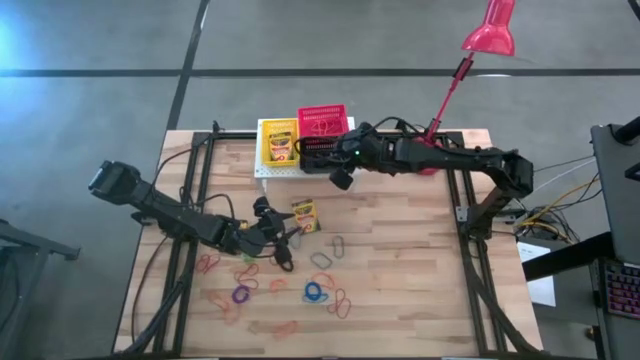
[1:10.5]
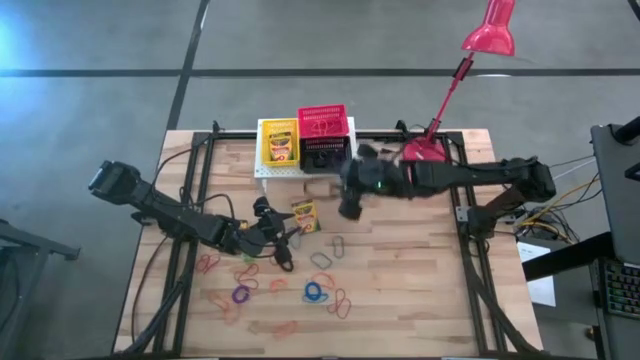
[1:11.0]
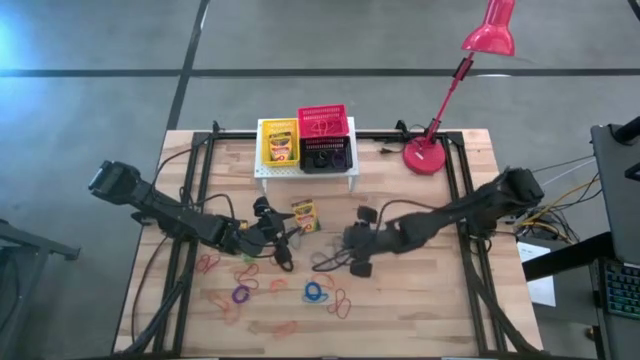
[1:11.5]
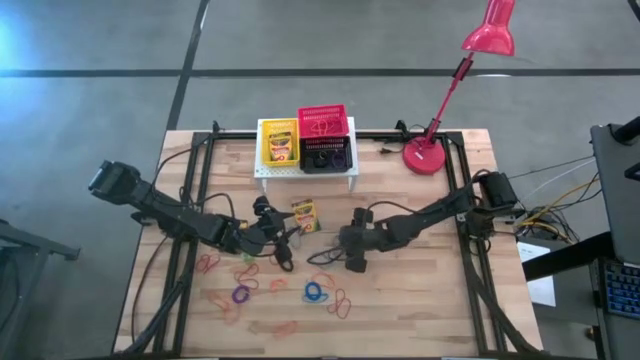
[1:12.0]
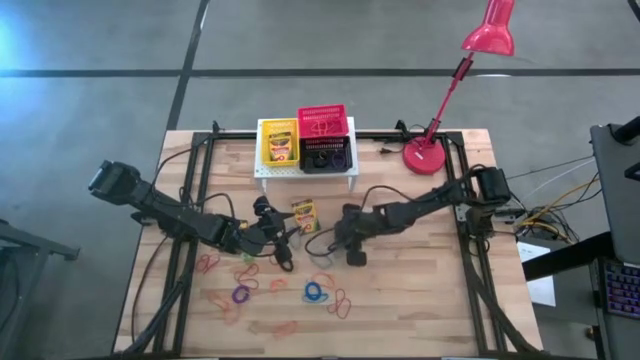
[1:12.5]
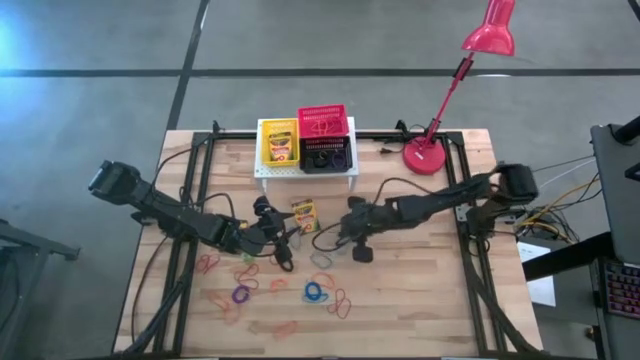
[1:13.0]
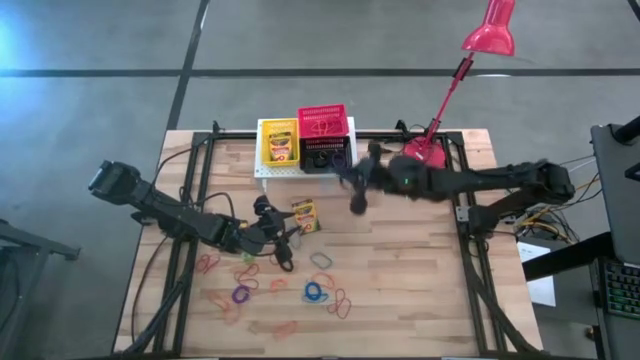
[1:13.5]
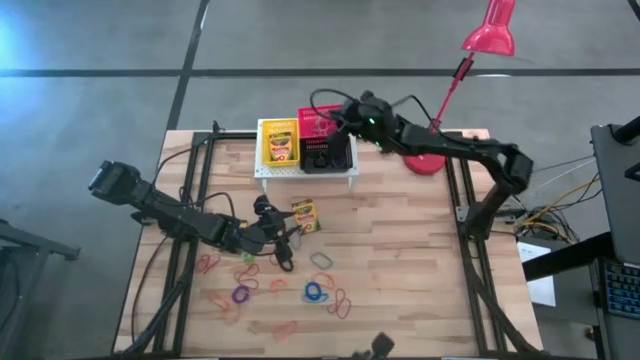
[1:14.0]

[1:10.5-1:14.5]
Task: Pick & Place Office Desk Supplies
Put the blue rubber band into the red bin

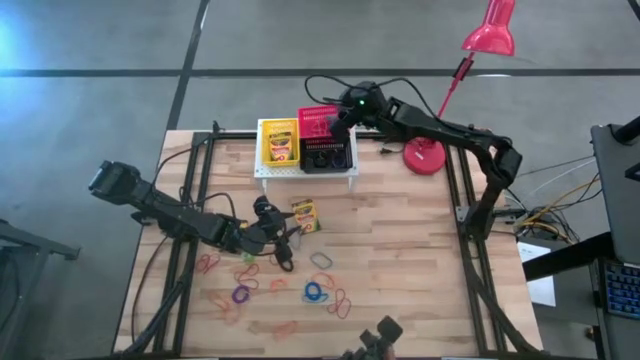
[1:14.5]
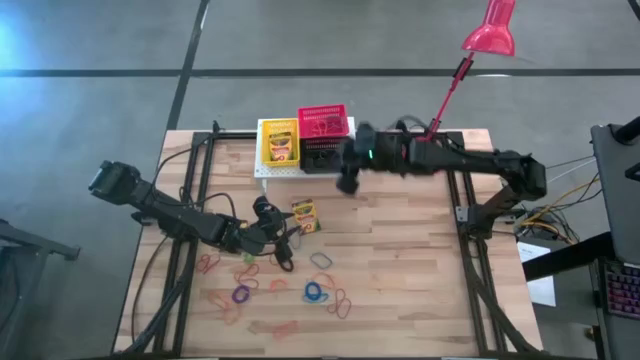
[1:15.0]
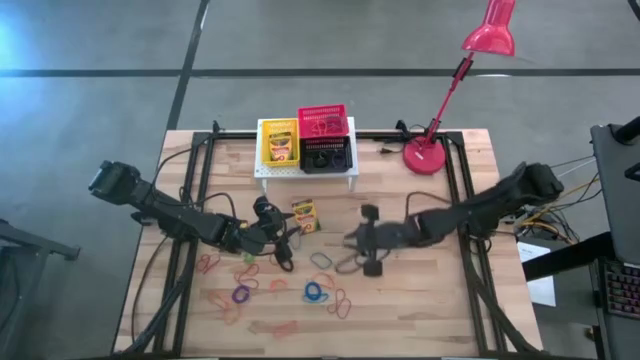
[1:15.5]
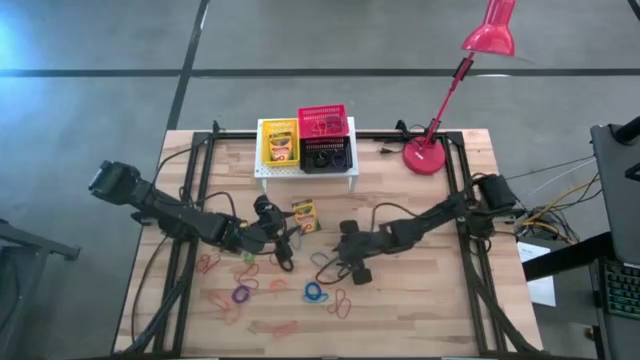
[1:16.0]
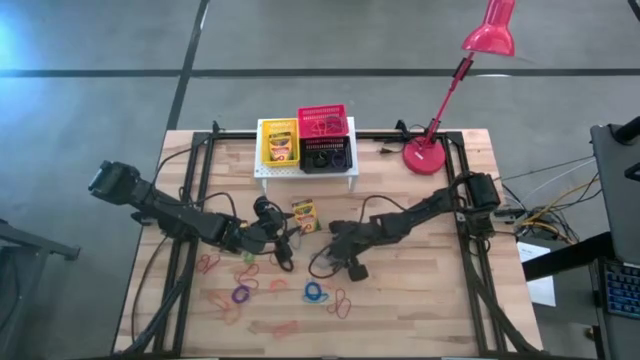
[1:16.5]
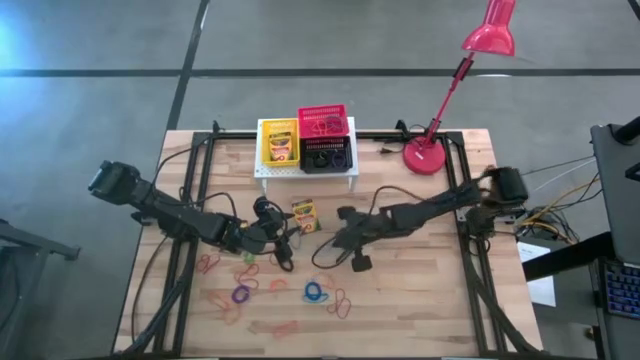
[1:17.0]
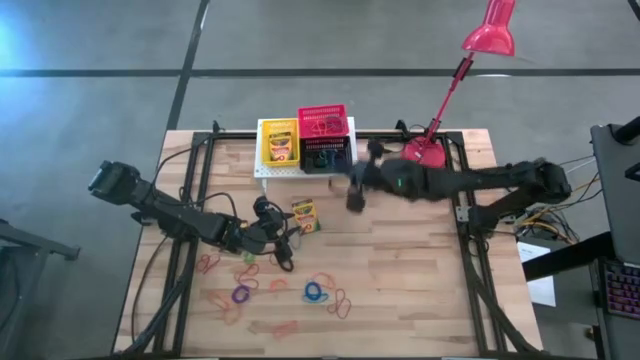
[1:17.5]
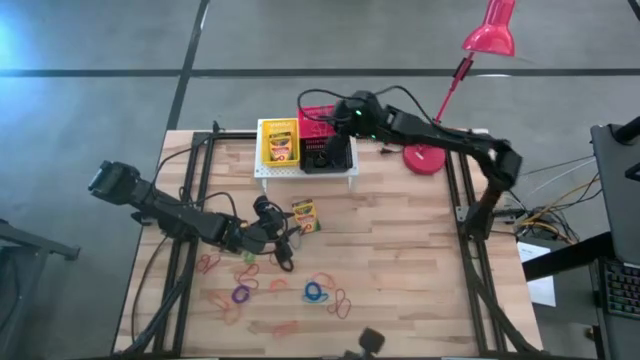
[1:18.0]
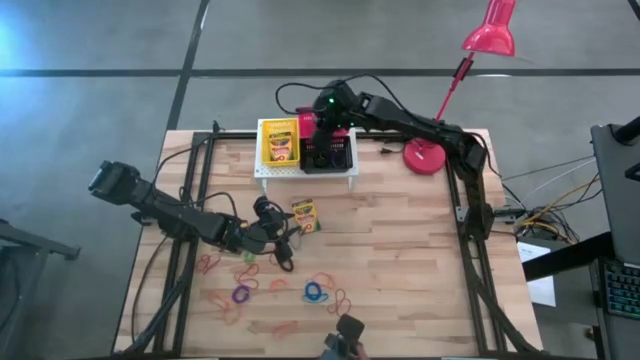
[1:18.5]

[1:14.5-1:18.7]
Put the blue rubber band into the red bin

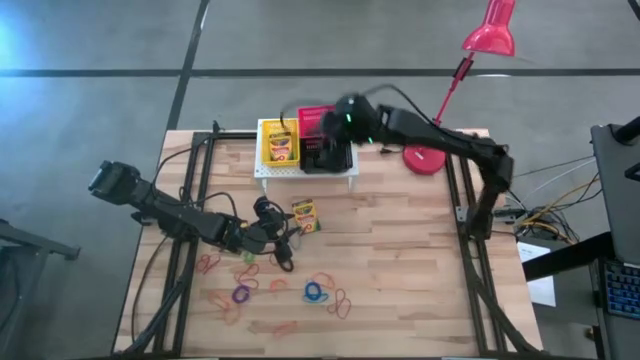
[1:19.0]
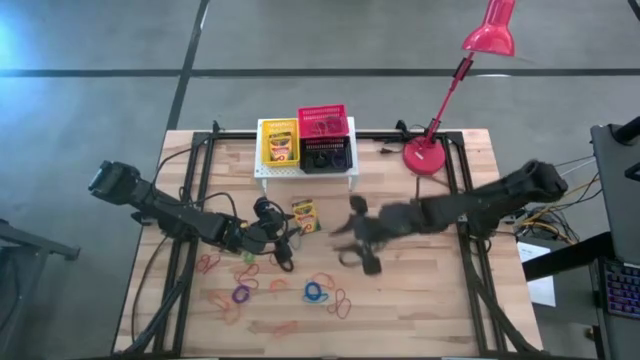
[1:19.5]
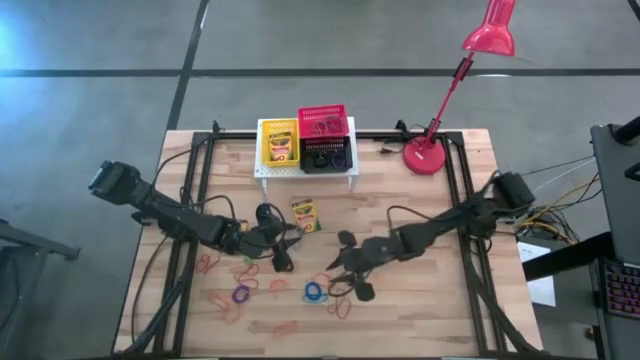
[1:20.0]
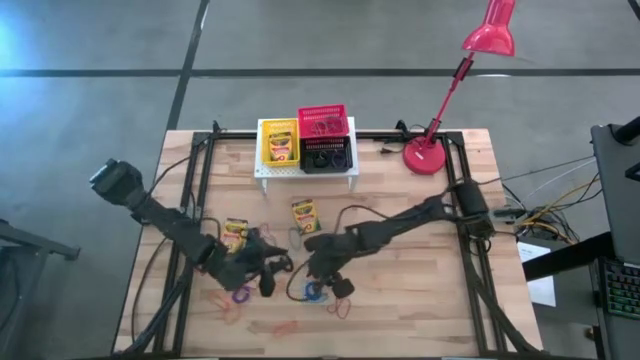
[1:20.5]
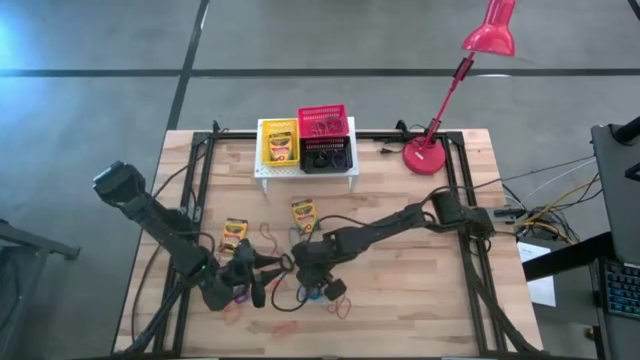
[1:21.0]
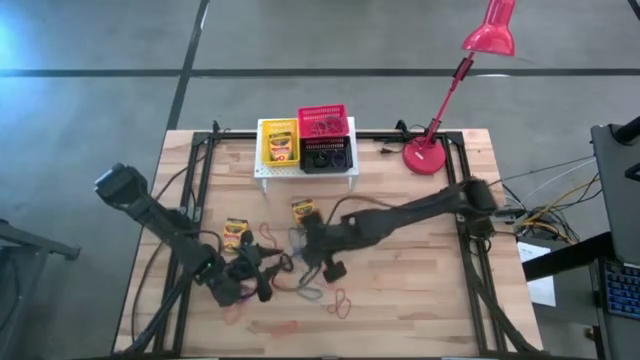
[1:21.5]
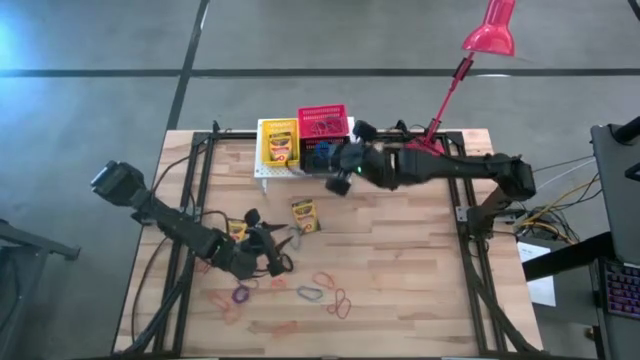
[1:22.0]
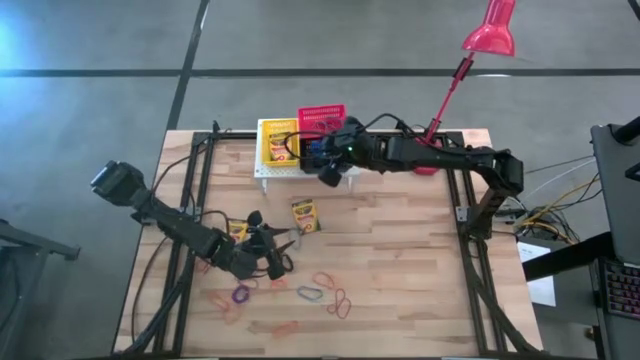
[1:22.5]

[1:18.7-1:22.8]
Put the blue spring keychain into the black bin

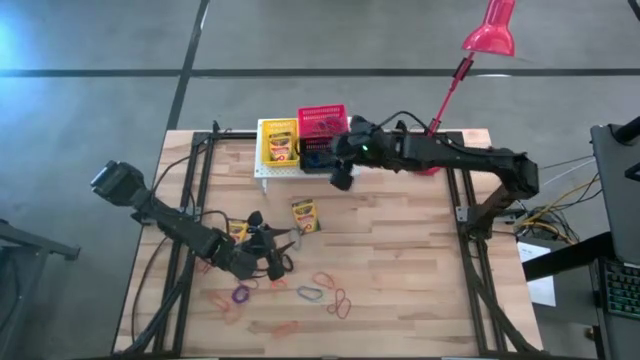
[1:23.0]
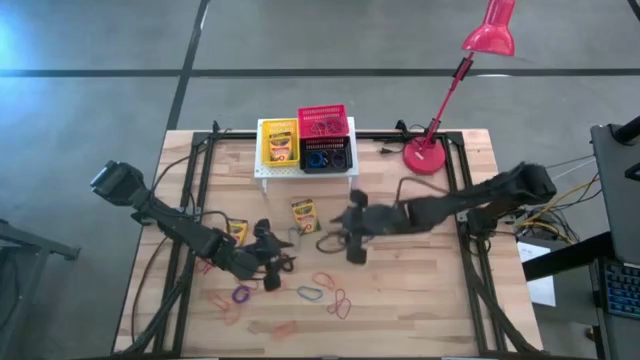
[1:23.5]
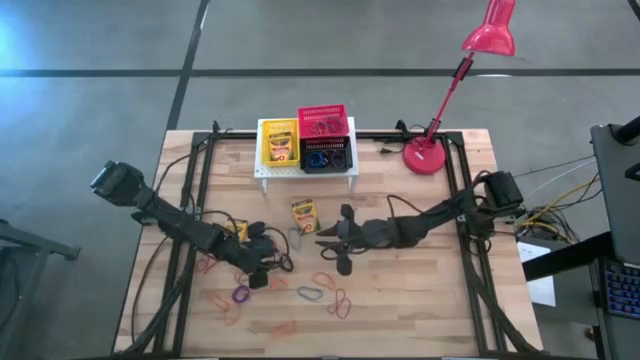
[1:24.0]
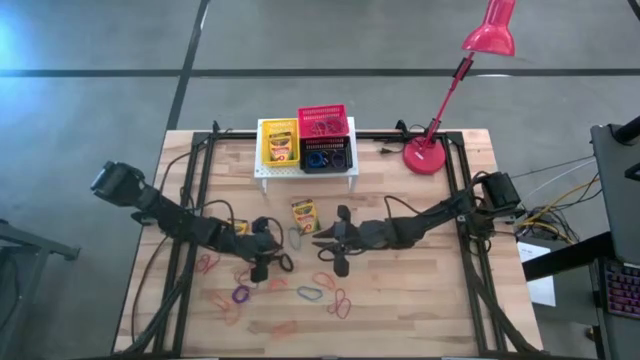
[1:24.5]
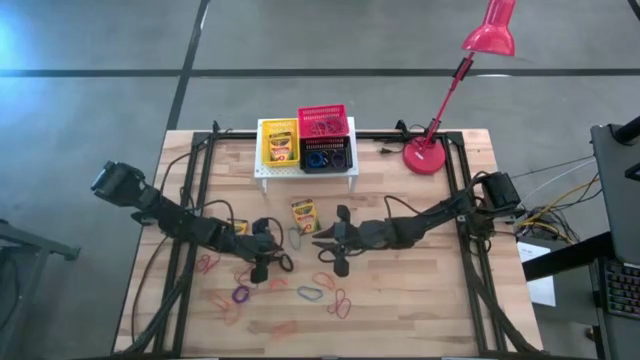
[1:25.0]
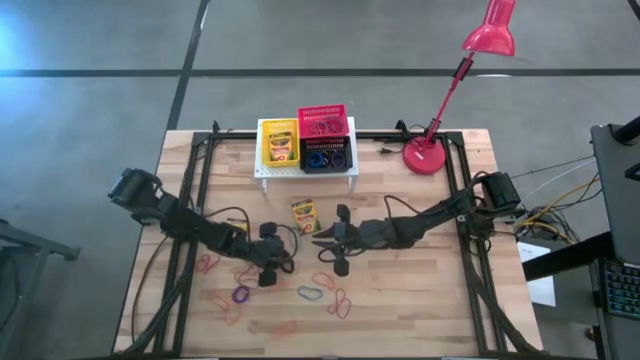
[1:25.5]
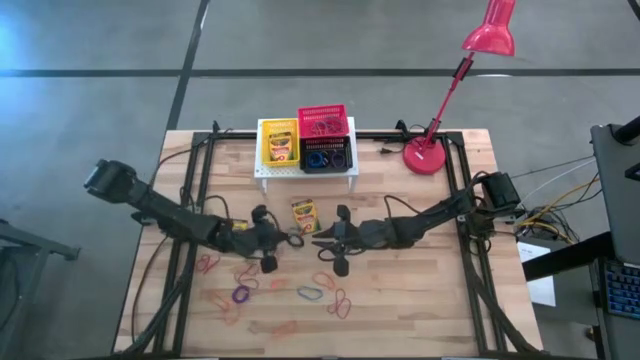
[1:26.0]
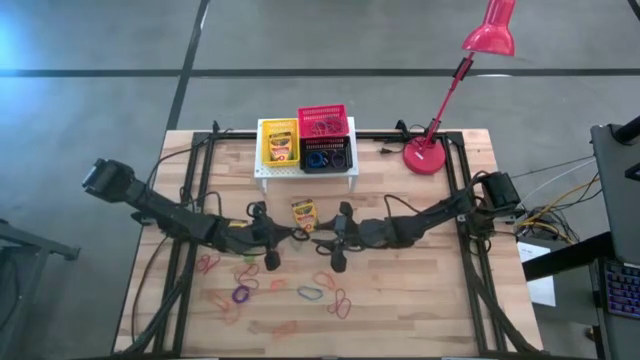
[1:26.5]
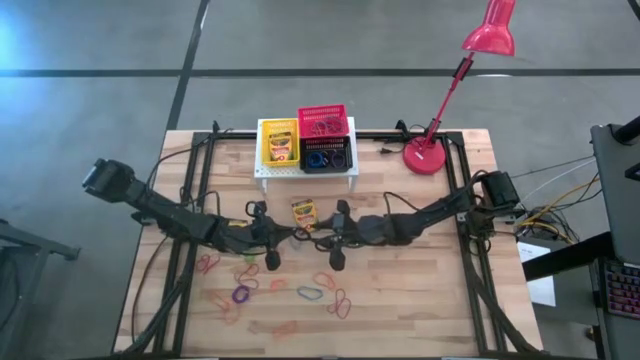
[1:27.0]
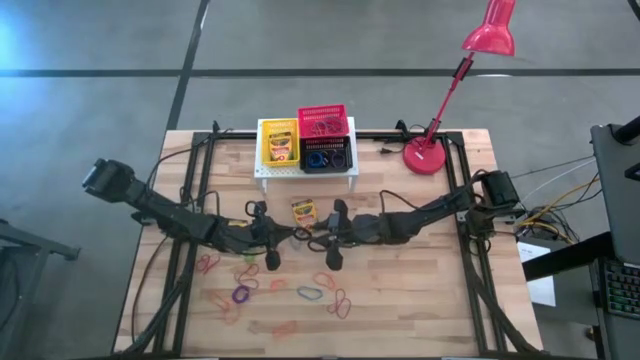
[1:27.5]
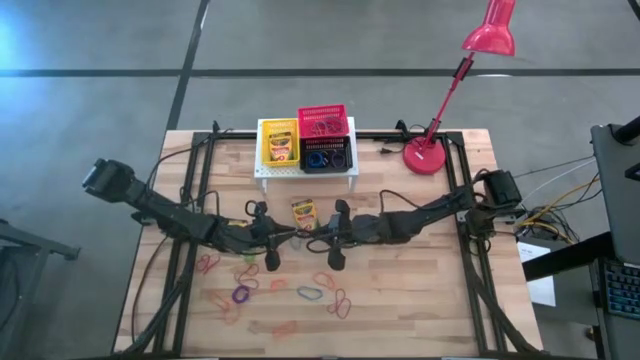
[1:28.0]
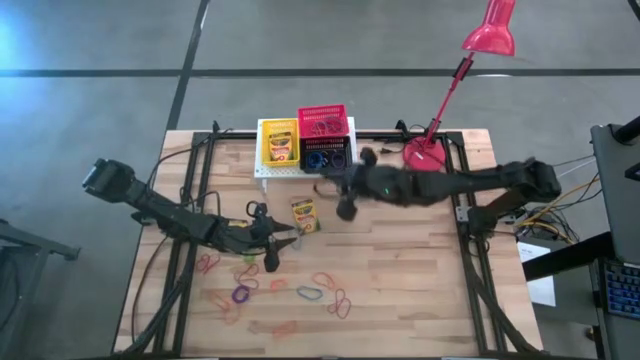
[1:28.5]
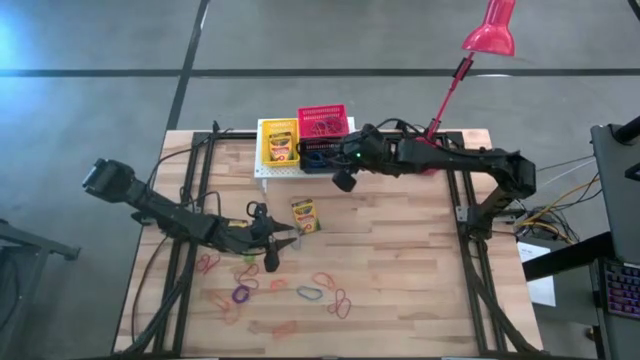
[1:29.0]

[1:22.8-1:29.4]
Put the black spring keychain into the black bin

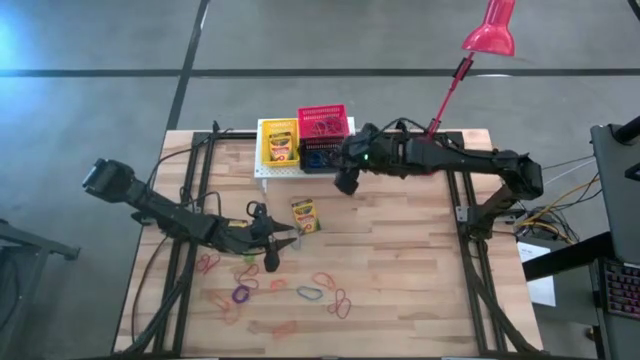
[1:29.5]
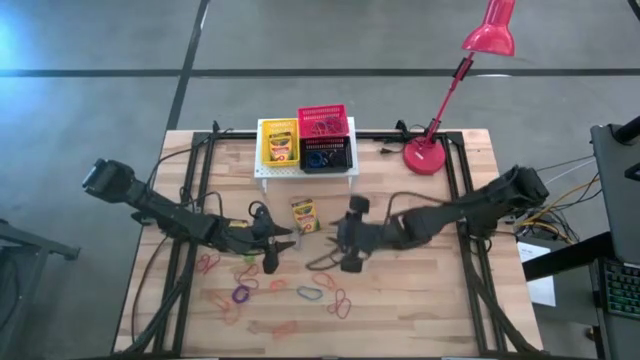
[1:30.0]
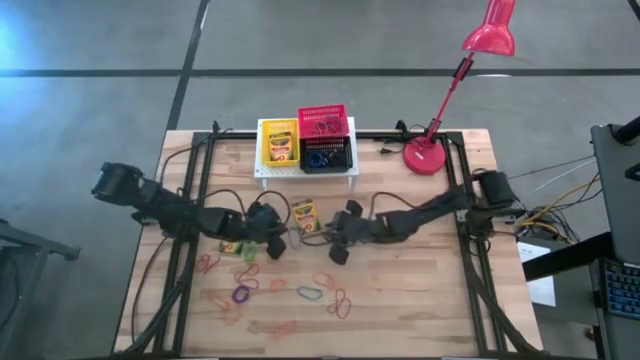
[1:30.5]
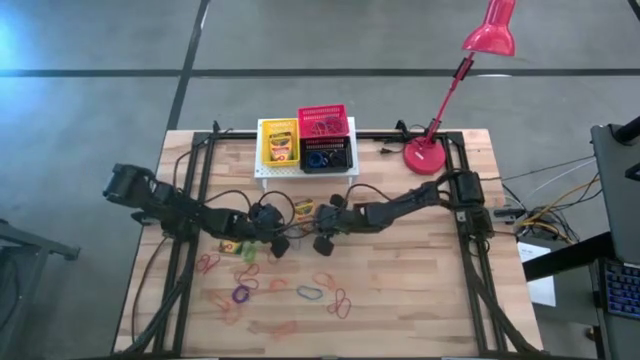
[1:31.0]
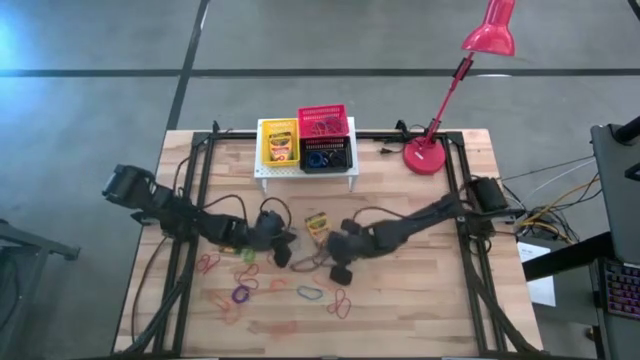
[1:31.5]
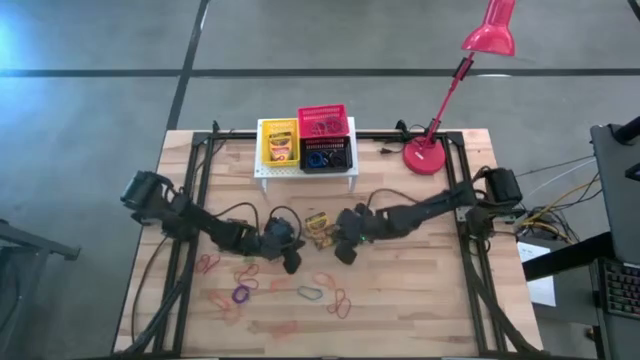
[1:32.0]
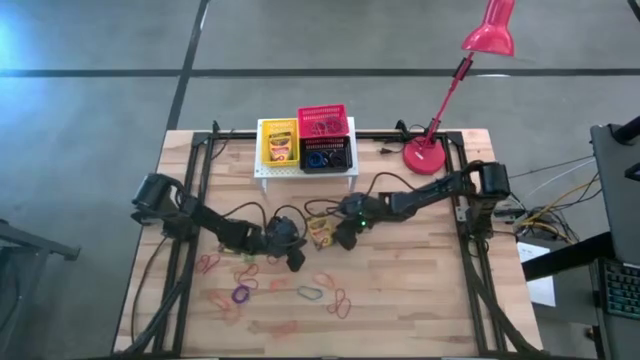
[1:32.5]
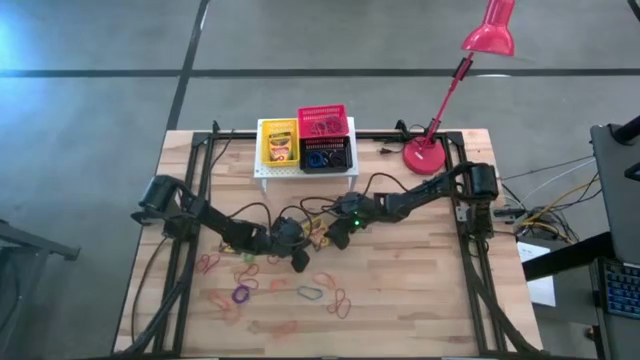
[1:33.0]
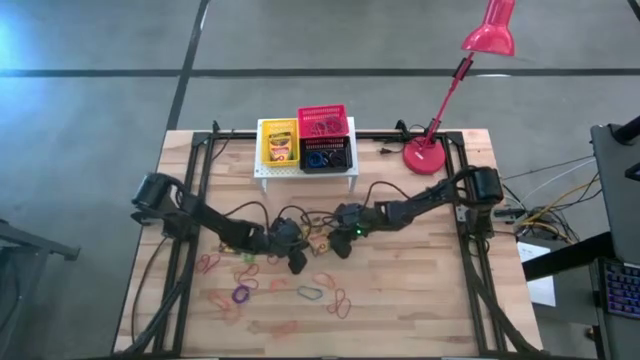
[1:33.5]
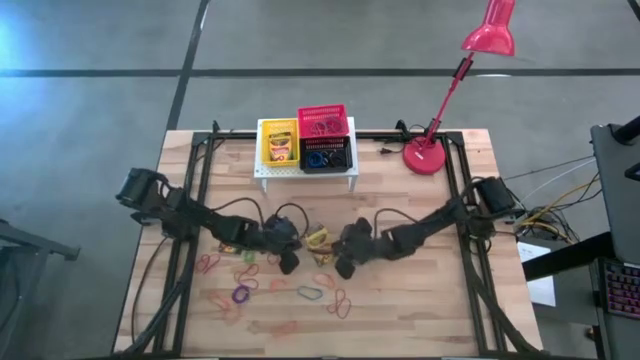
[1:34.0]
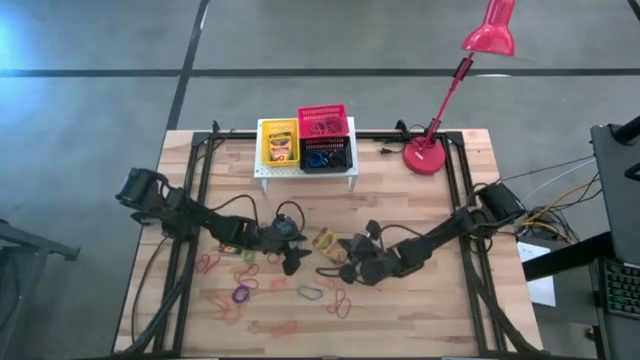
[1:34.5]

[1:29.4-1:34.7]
Put the crayon box into the yellow bin
